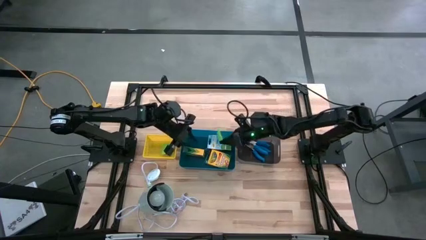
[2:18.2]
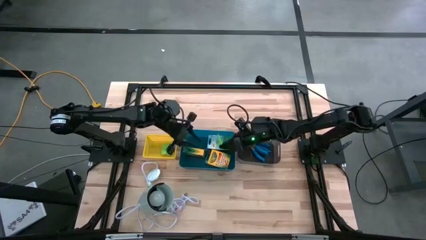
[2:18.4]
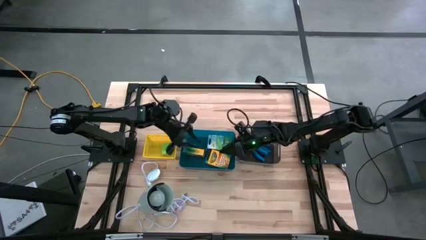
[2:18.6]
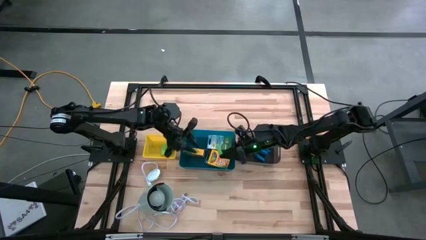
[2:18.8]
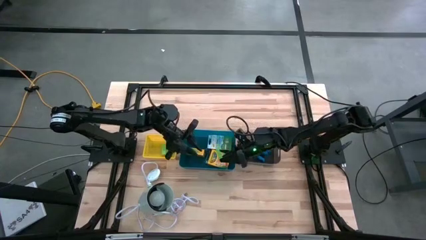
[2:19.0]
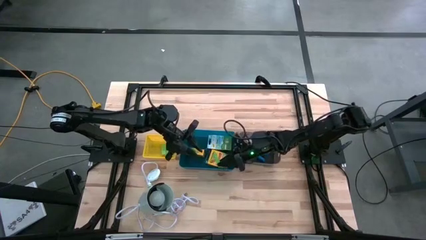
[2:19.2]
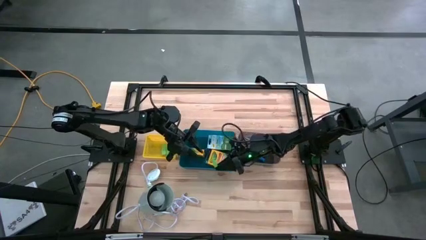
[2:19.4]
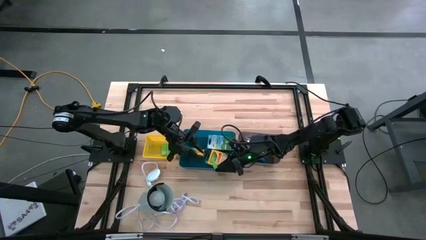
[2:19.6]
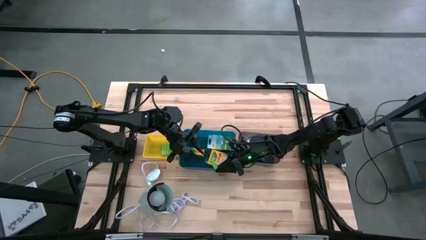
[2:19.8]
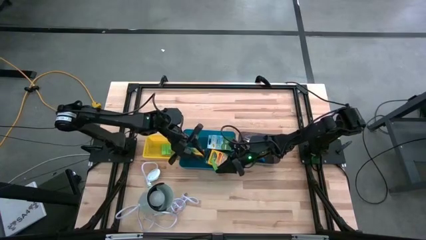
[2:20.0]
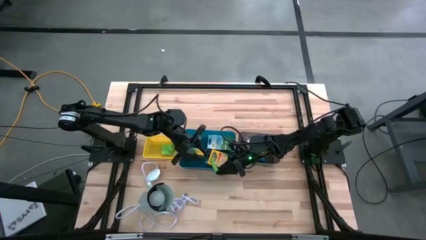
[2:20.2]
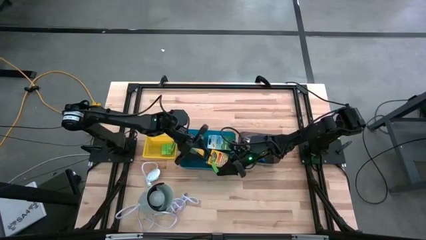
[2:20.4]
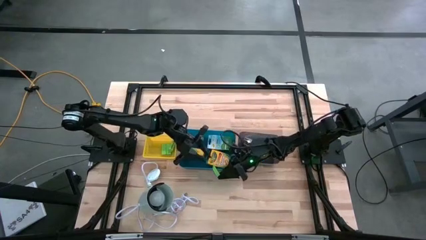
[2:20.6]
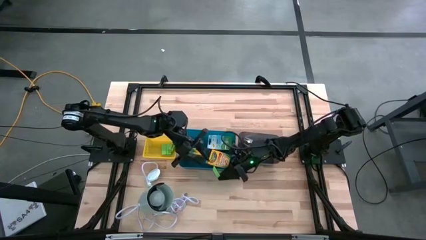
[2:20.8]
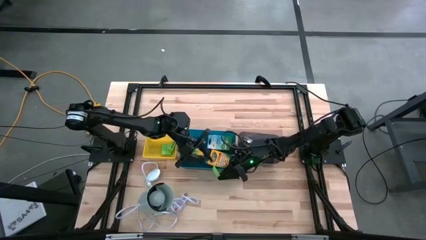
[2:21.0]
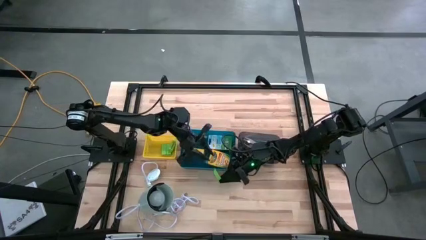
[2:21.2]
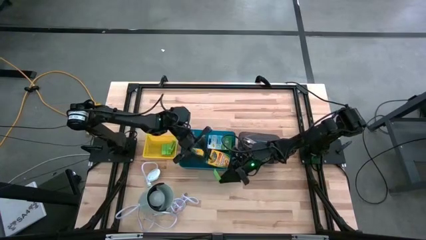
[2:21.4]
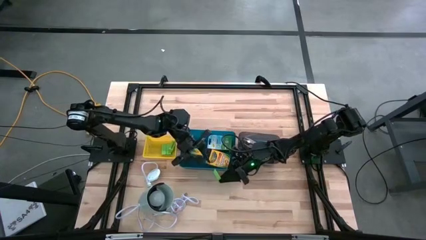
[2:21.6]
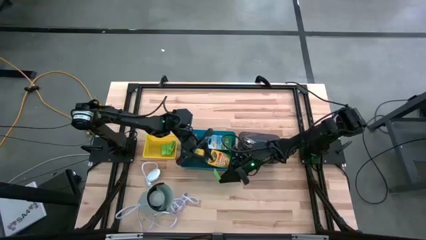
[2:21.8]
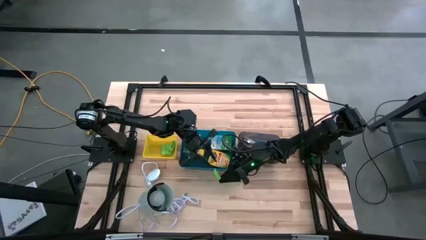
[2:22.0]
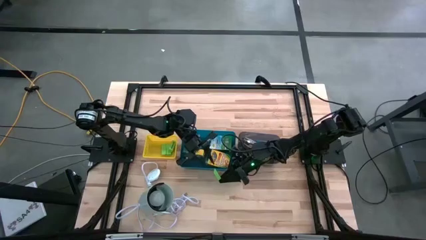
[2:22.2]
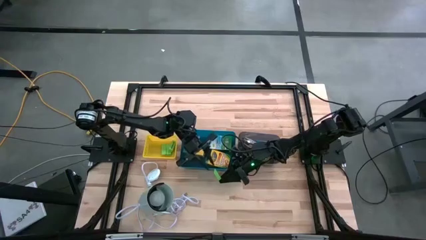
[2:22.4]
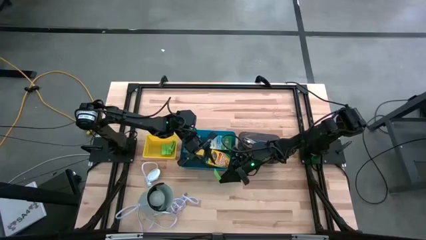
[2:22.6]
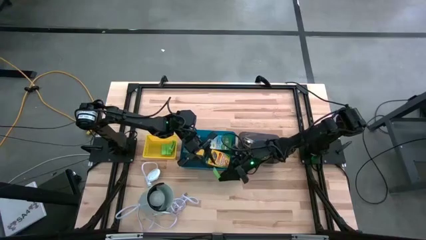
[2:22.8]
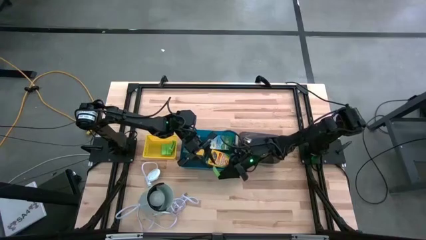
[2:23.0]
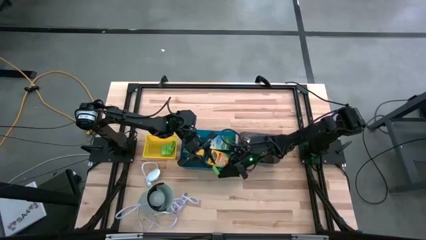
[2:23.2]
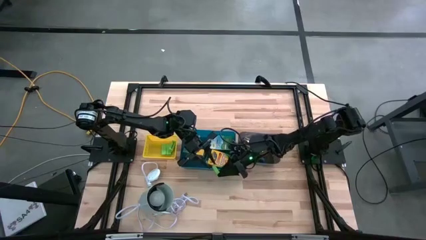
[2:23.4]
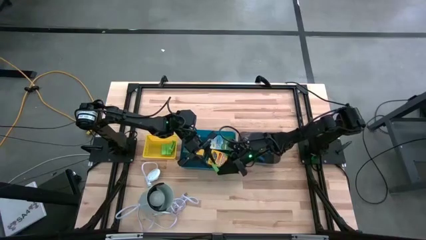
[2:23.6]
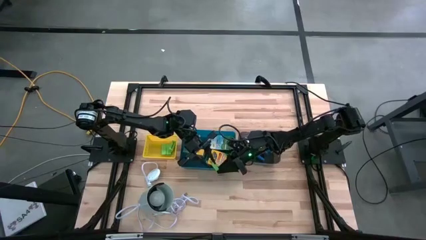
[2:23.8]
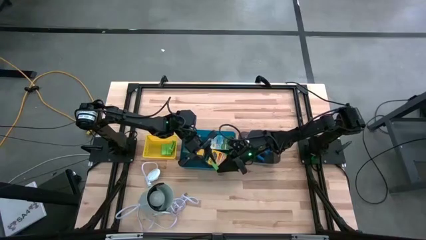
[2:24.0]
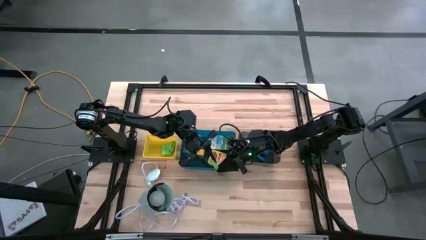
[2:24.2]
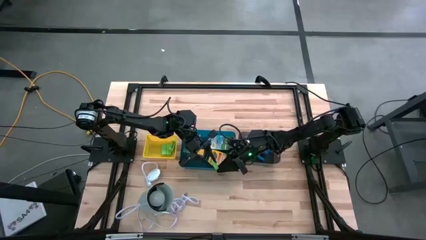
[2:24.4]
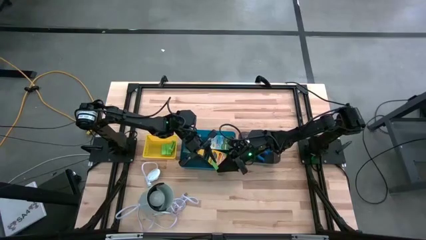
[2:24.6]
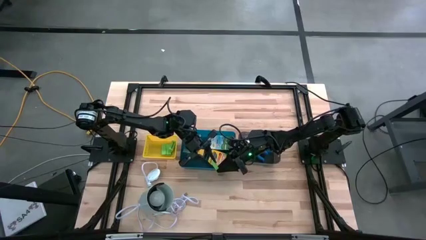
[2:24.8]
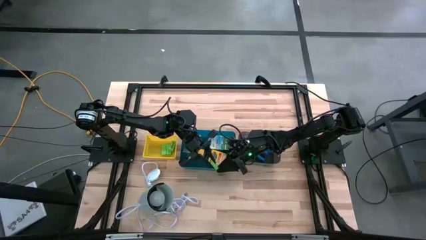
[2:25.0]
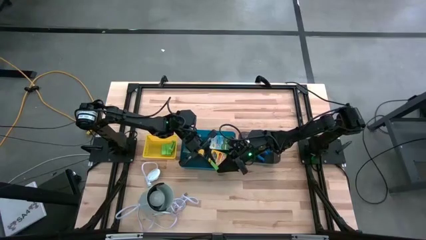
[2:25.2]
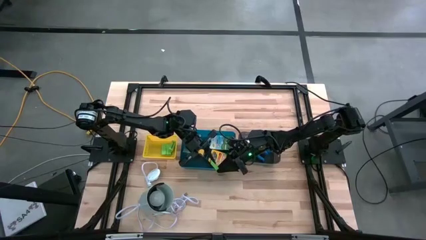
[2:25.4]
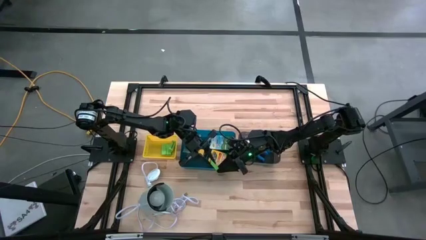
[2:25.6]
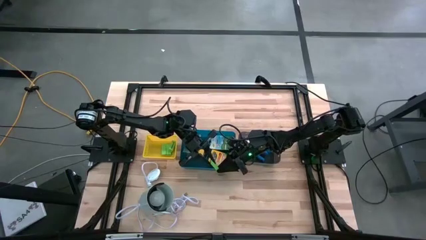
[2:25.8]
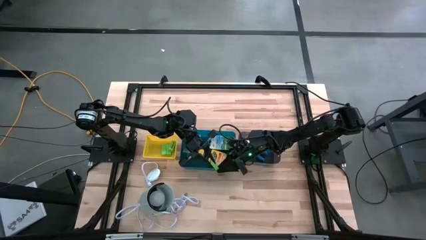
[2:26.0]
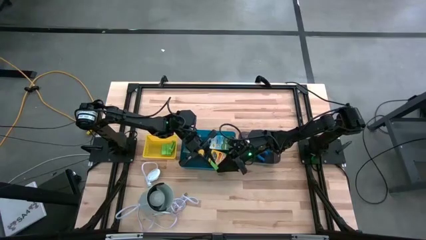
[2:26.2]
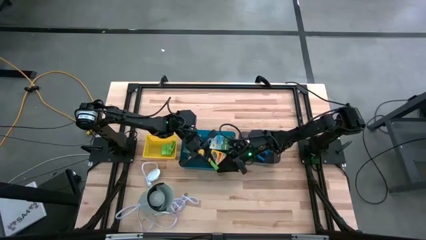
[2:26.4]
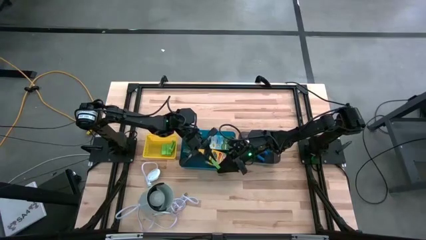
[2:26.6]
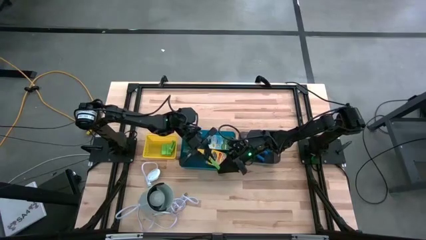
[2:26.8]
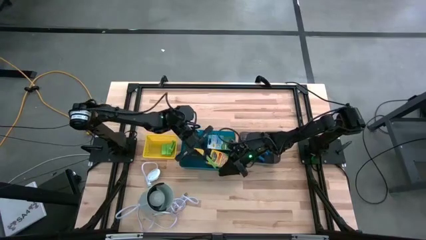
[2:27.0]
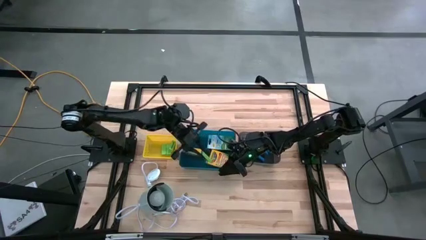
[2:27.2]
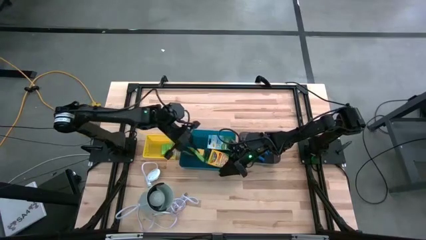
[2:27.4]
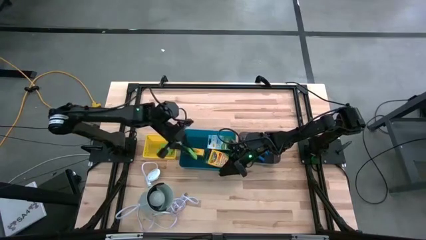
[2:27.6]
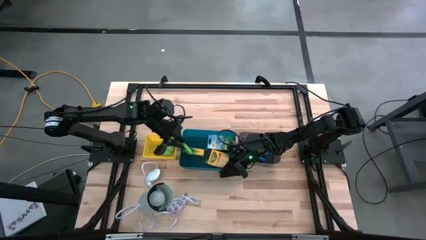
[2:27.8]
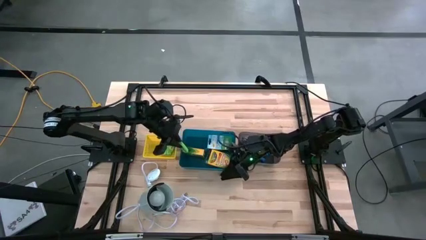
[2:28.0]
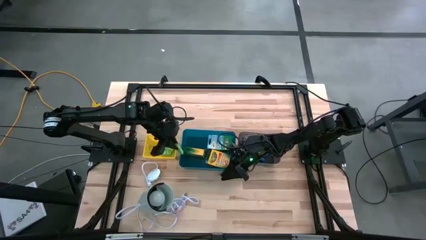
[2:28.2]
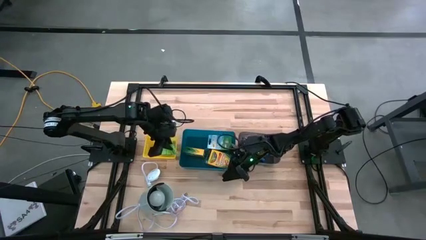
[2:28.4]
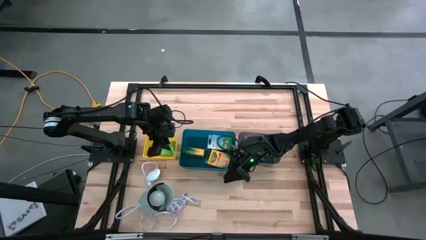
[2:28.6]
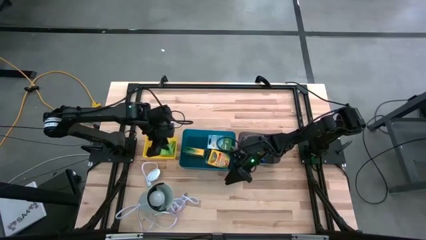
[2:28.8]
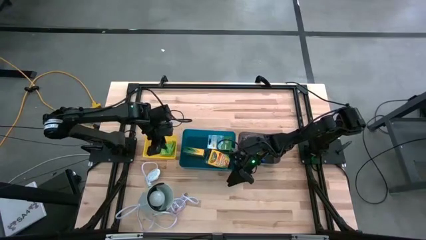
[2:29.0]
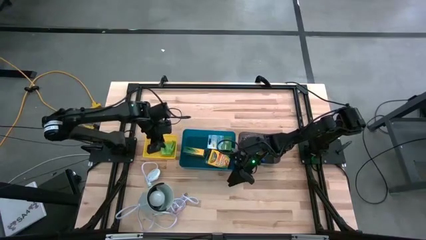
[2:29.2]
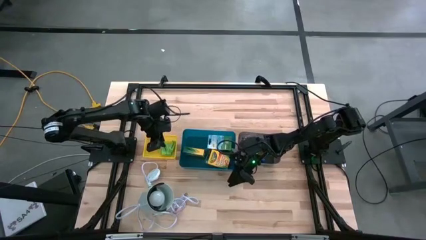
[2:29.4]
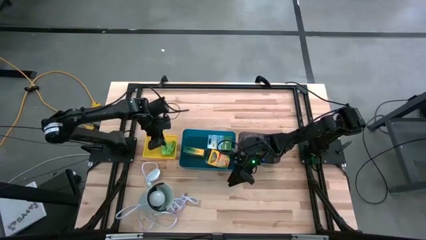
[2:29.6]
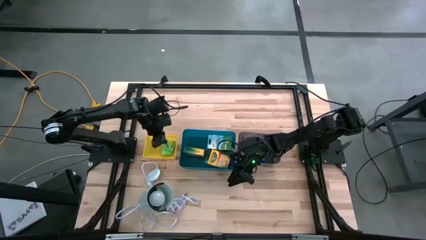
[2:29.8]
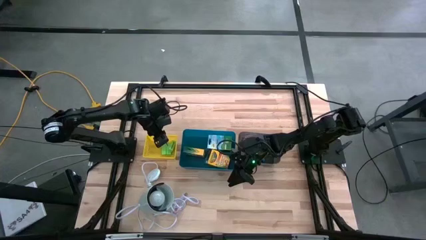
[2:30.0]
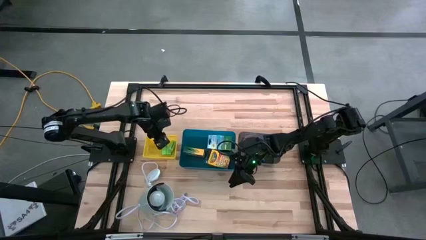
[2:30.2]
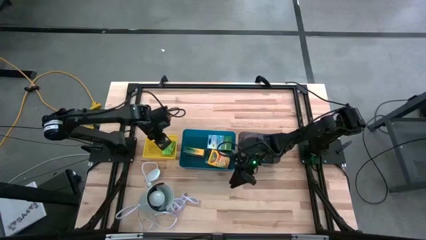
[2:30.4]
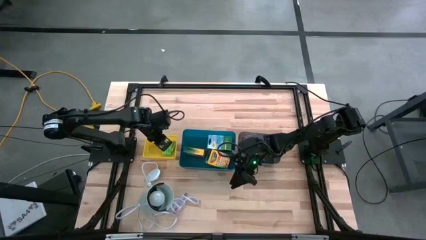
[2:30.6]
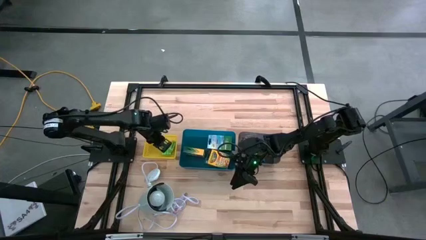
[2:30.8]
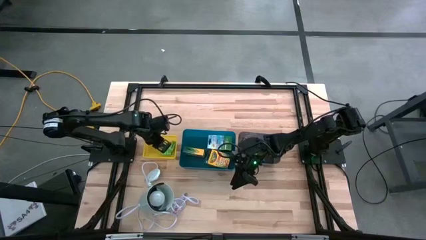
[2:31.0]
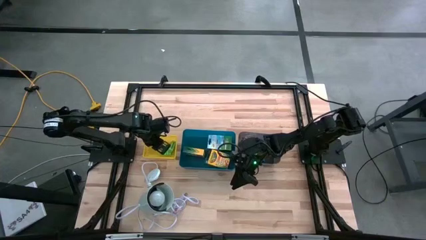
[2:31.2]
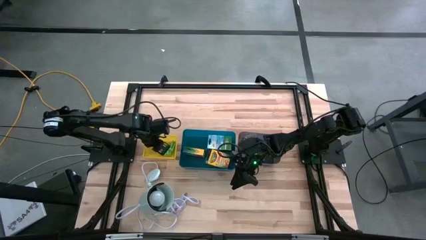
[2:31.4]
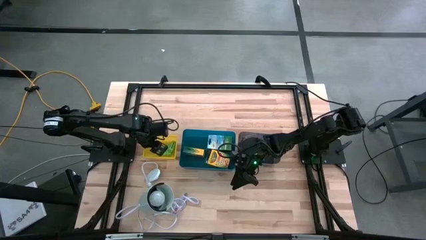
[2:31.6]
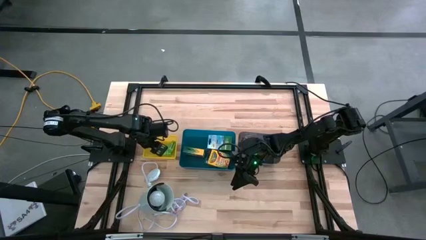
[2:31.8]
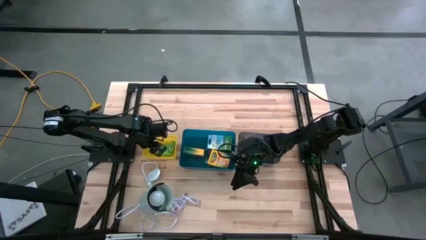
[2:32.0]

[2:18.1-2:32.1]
Task: Pick & Place School Supplies
Put the green eraser into the yellow bin

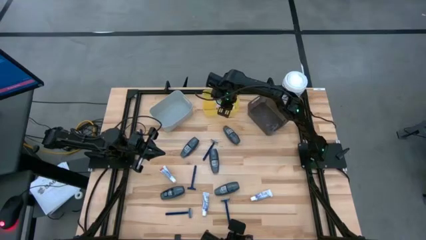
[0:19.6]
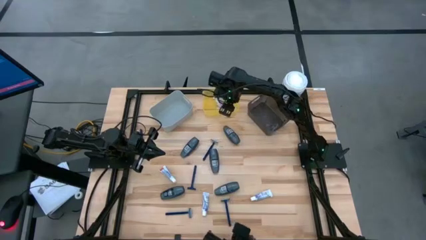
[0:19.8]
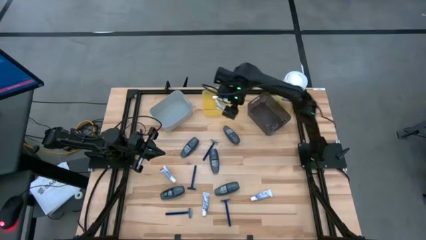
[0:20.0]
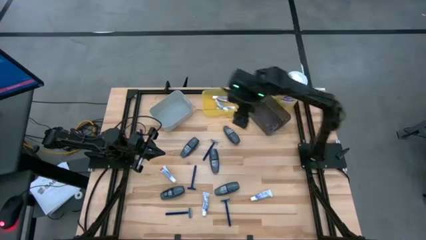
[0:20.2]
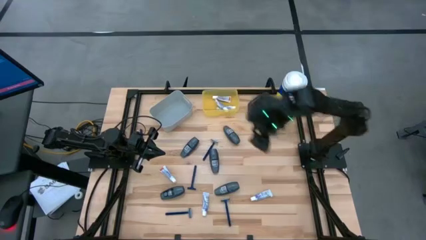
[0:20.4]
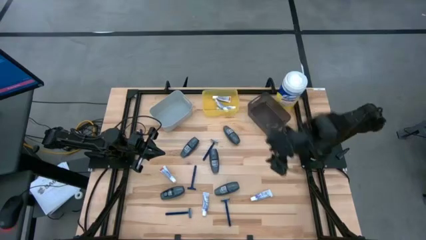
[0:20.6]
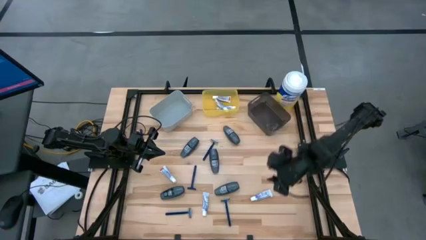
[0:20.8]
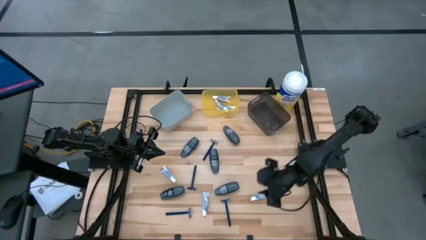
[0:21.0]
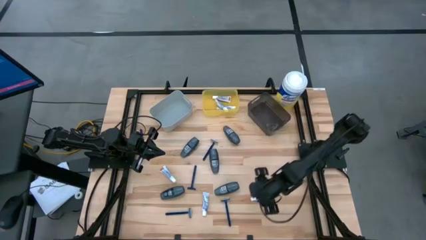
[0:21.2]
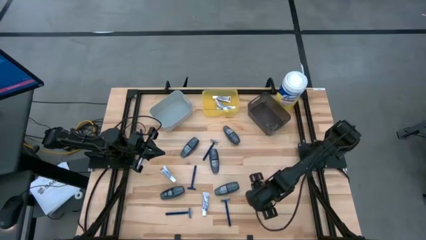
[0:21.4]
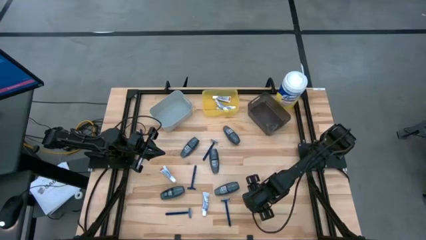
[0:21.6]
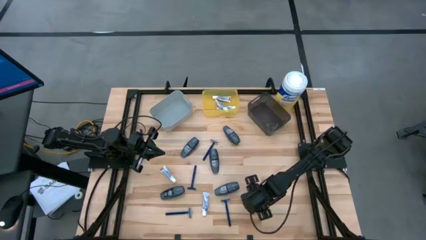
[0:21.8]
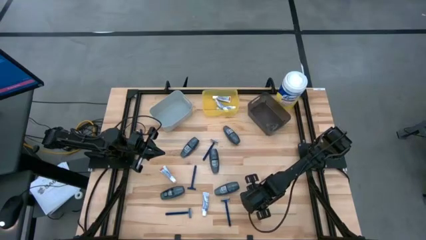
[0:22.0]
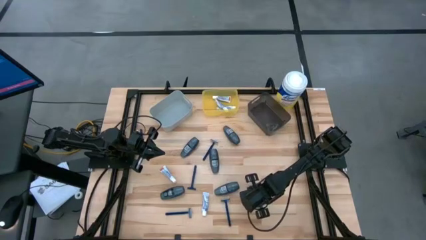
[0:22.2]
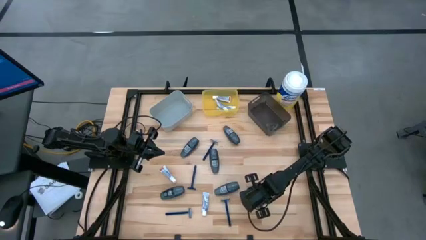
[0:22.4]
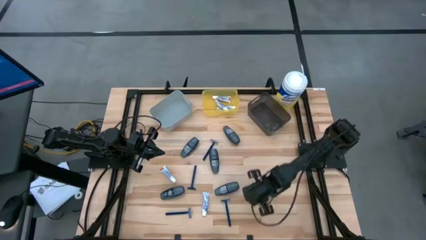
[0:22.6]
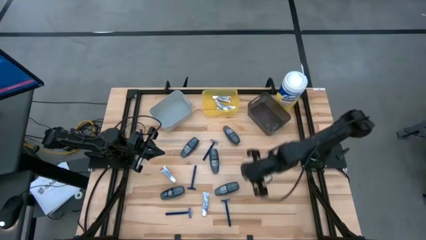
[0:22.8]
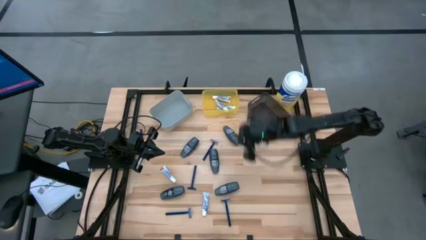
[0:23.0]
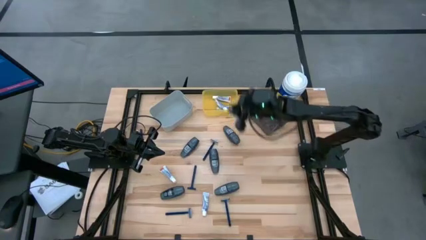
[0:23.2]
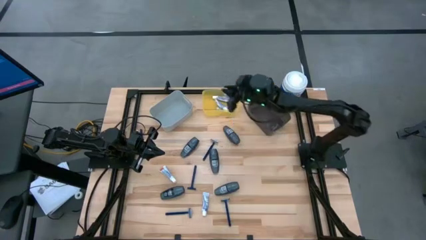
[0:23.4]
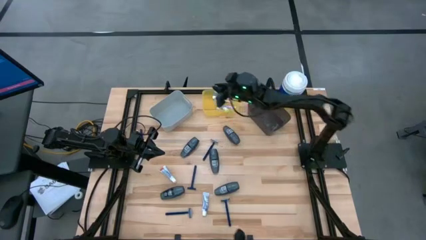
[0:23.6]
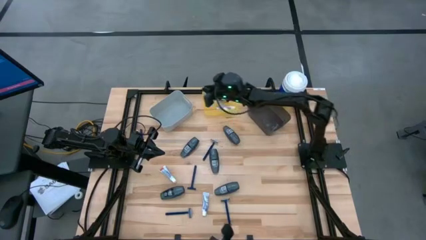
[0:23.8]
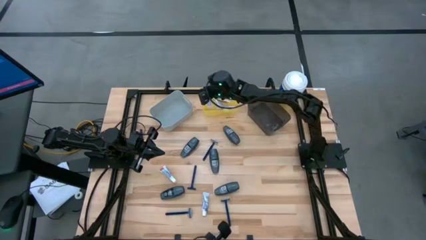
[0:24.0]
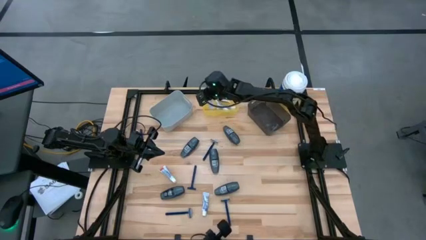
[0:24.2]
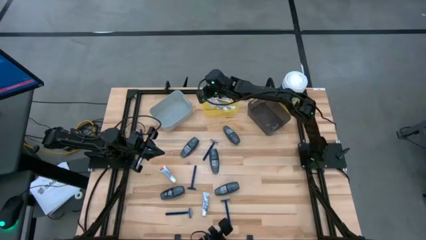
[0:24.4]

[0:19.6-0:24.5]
Task: Pick & Place Travel size toiletries
Put the white toothpaste into the yellow bin
